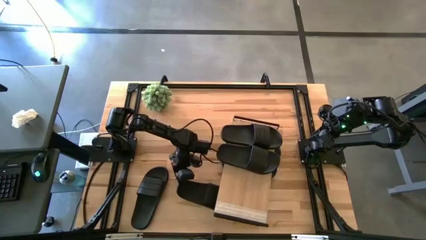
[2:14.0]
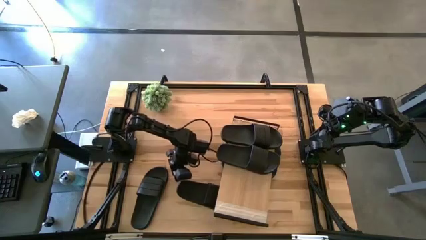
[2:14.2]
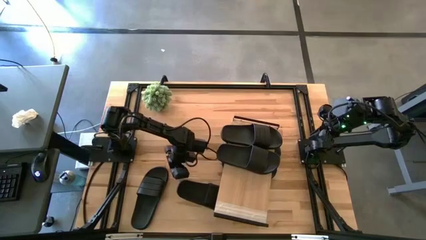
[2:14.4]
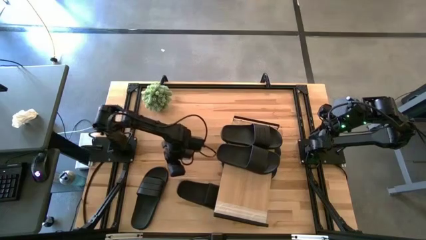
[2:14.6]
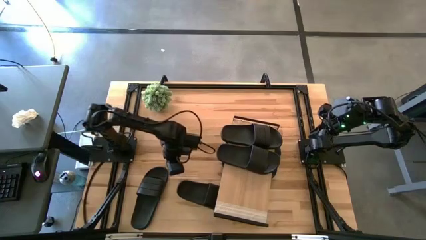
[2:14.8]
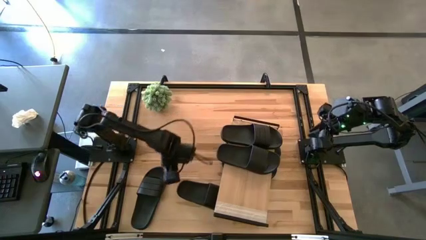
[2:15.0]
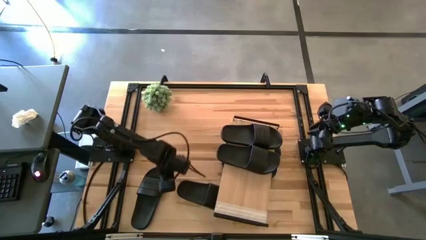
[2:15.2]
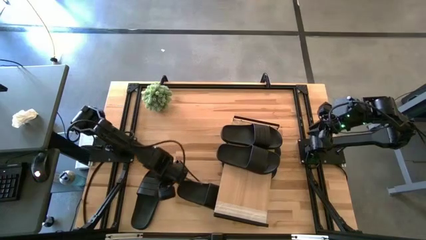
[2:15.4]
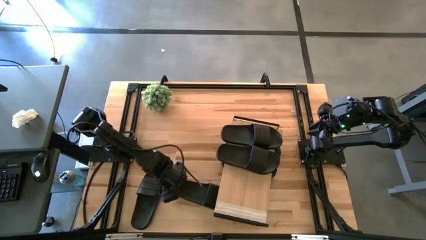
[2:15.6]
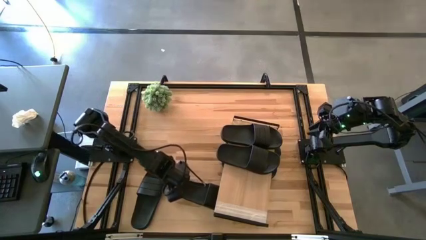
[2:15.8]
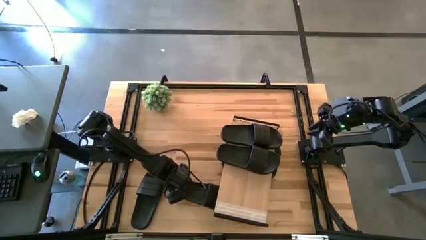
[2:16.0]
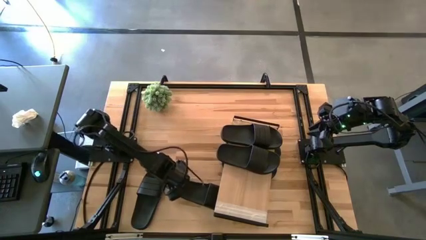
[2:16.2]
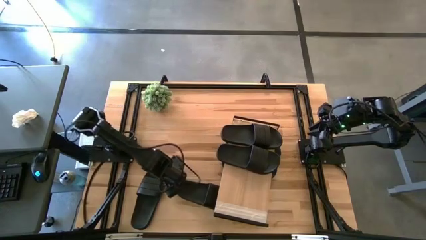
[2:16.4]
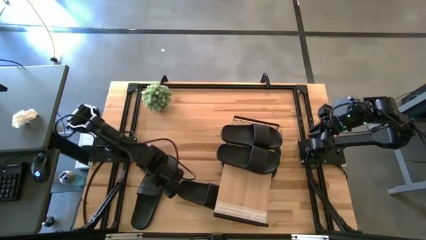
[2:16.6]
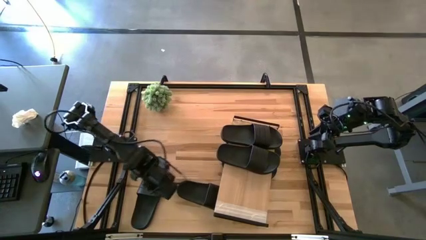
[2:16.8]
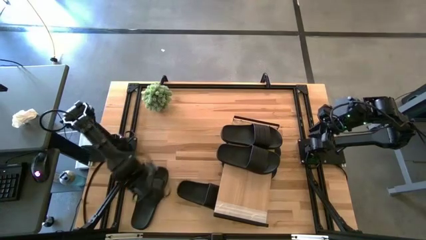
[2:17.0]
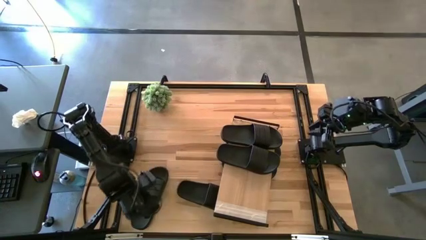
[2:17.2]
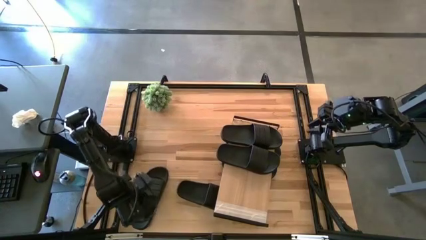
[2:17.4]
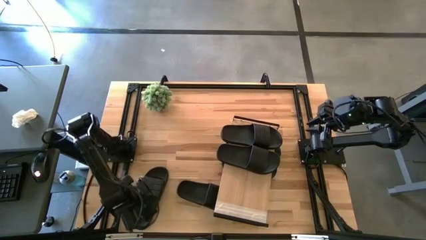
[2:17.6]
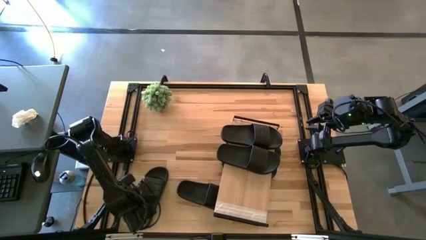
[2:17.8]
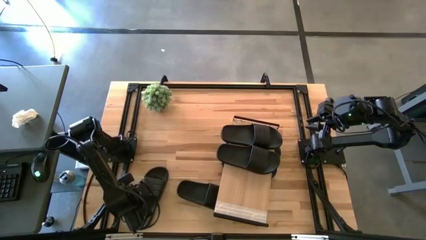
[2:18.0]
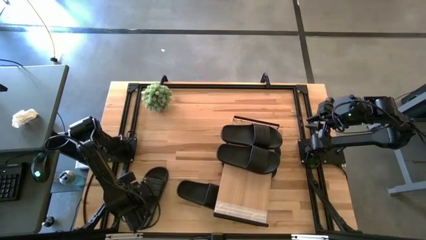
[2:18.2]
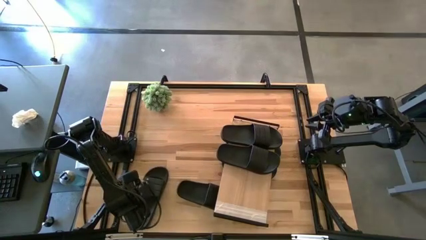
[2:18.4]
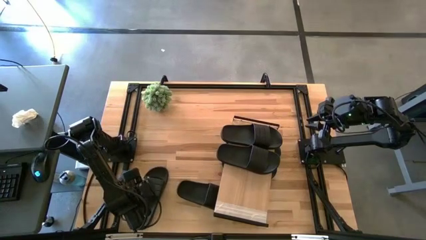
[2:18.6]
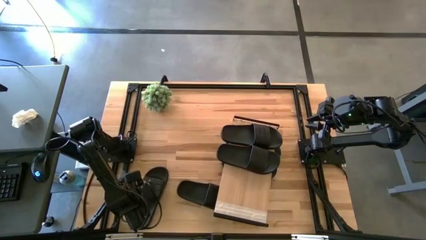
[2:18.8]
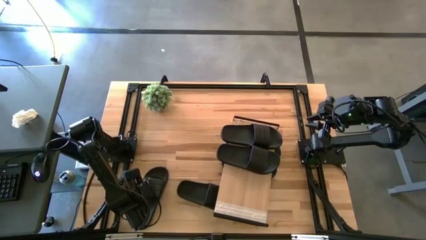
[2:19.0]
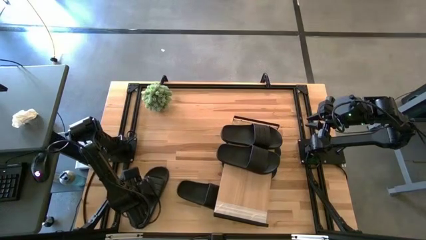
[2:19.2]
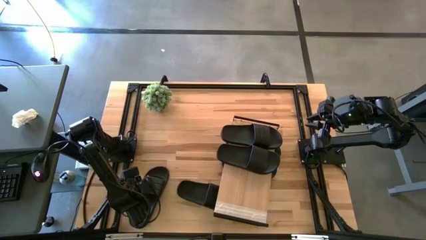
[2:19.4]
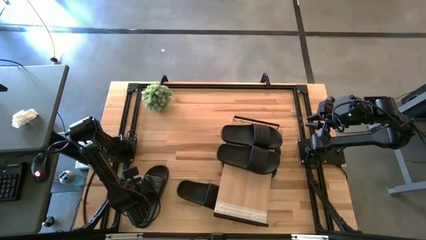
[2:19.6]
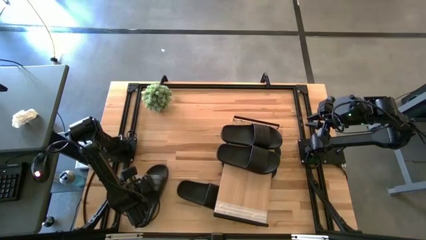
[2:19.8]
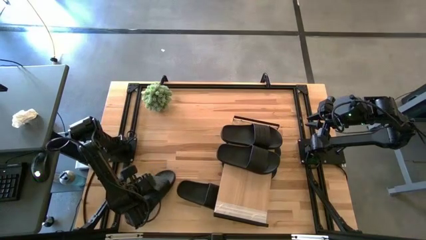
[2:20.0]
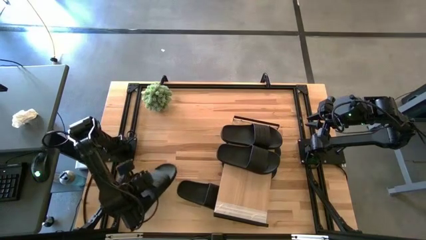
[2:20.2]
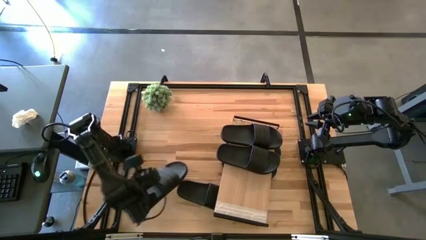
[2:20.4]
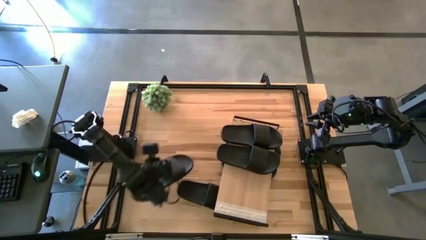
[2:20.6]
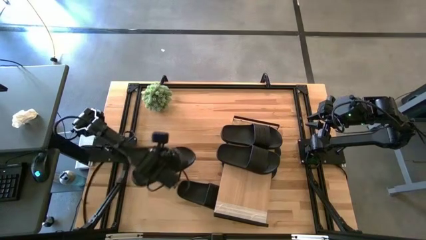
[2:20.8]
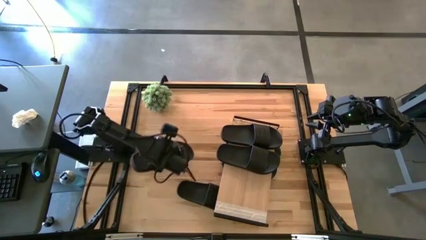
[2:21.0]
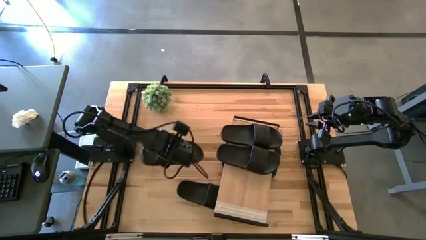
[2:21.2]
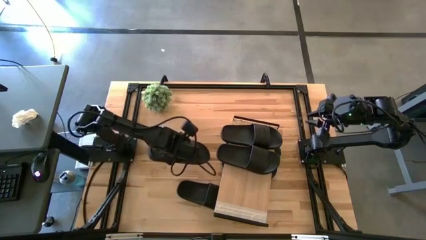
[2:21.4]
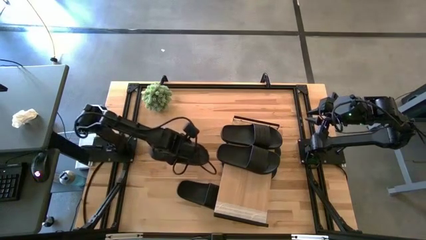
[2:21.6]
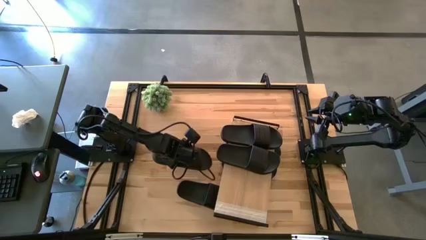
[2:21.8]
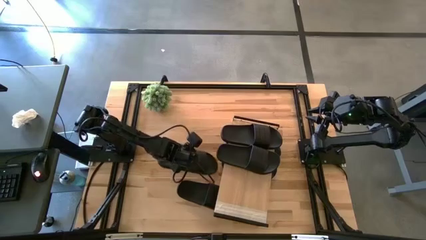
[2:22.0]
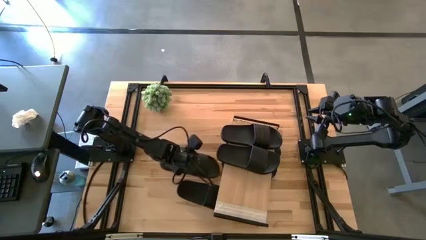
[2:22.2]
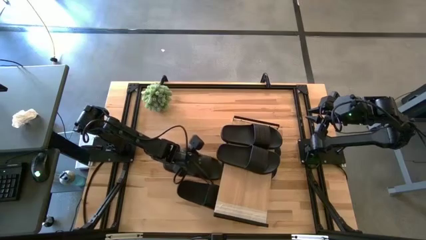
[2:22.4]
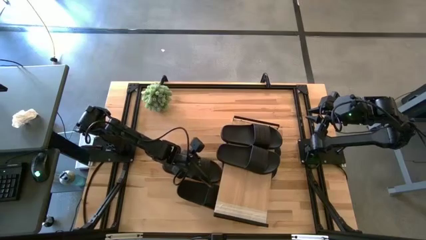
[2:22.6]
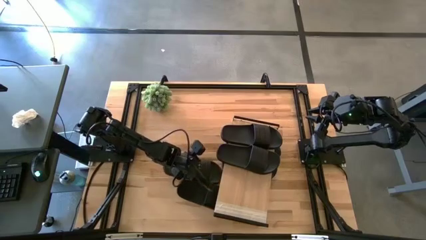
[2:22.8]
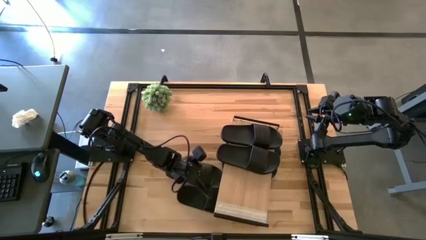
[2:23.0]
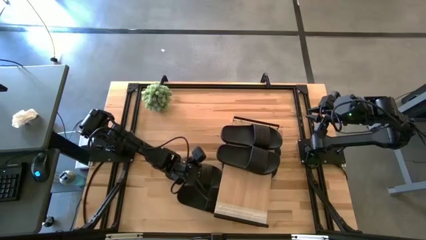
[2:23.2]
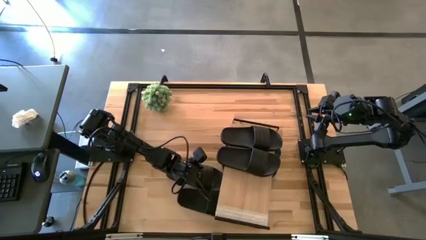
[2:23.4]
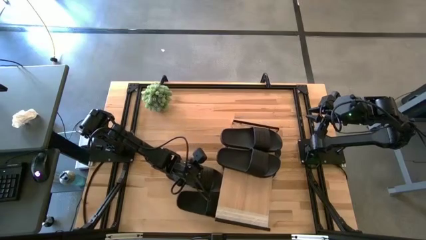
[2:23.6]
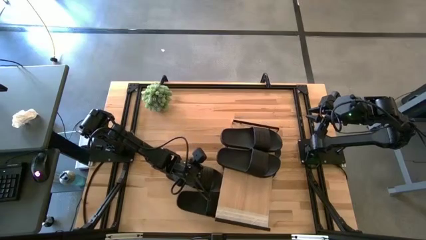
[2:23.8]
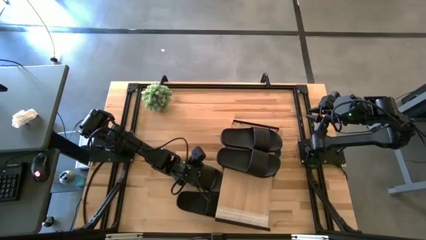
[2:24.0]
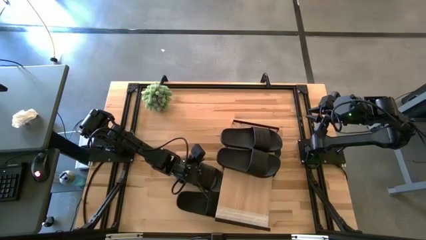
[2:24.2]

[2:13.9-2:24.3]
Task: Pick and place slides into the shelf
Put the black slide under the shelf

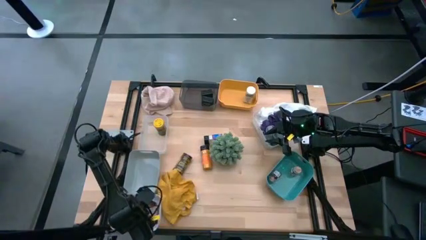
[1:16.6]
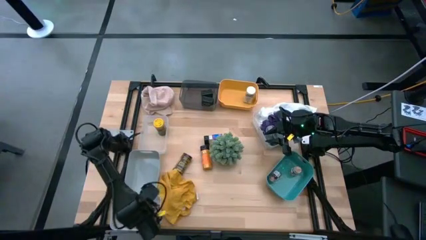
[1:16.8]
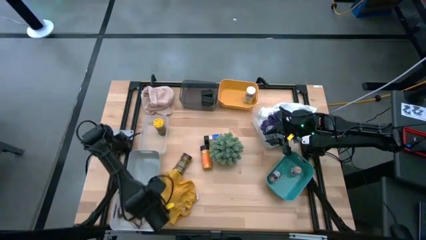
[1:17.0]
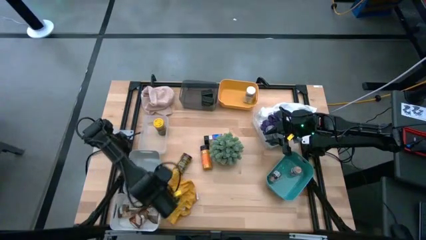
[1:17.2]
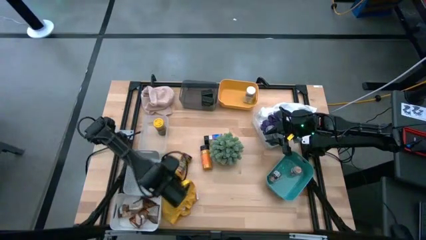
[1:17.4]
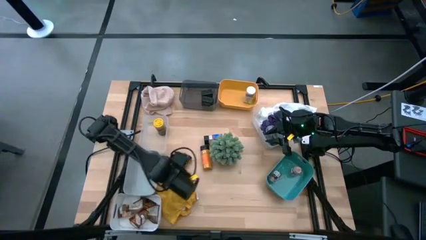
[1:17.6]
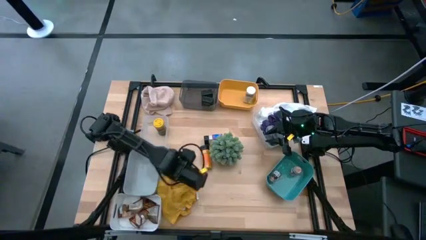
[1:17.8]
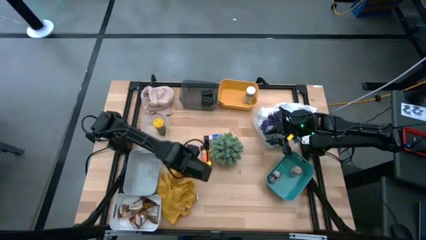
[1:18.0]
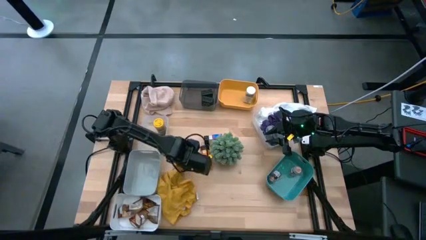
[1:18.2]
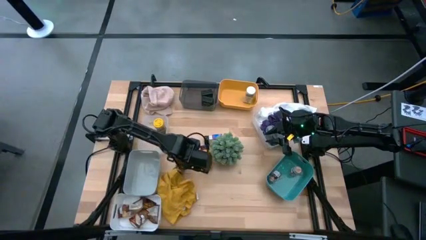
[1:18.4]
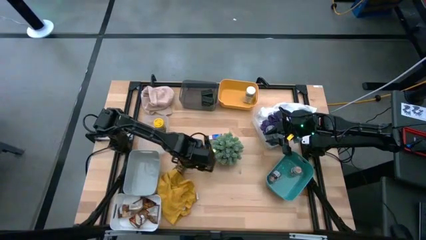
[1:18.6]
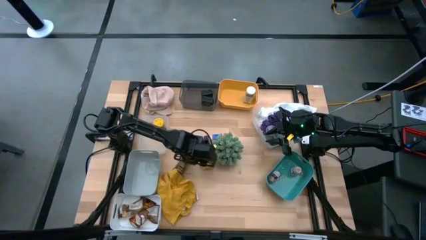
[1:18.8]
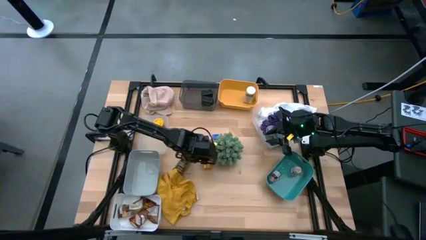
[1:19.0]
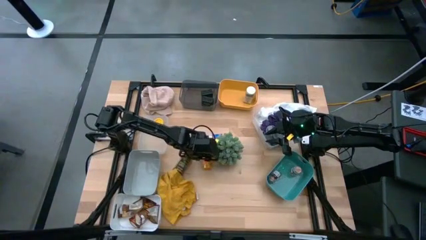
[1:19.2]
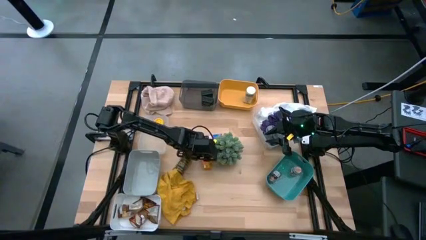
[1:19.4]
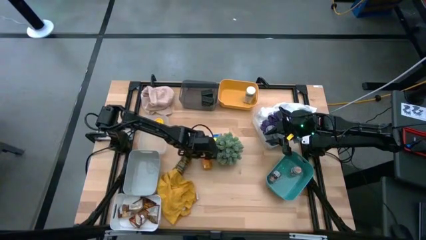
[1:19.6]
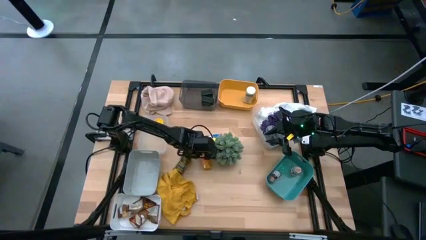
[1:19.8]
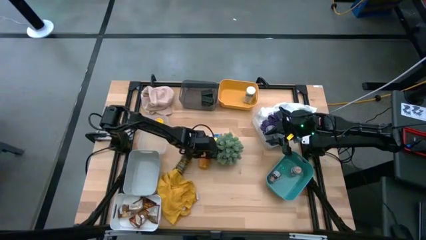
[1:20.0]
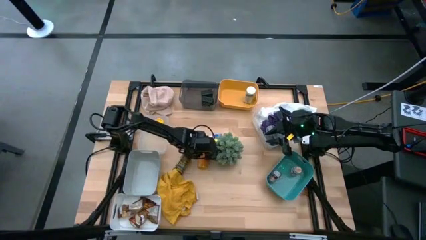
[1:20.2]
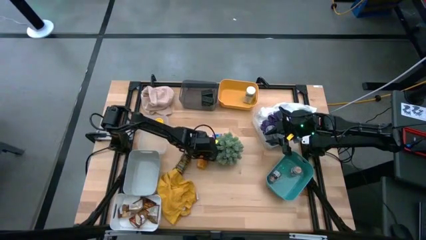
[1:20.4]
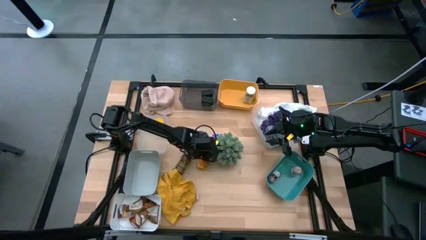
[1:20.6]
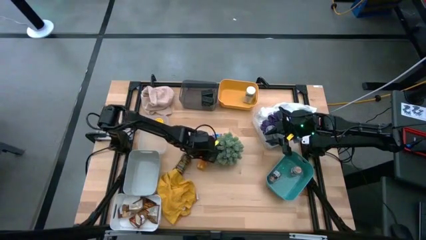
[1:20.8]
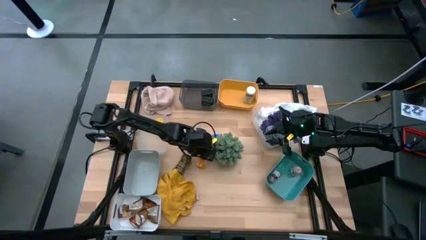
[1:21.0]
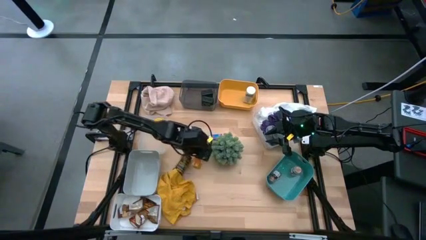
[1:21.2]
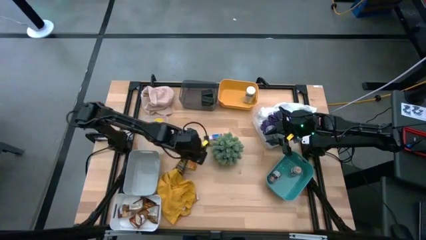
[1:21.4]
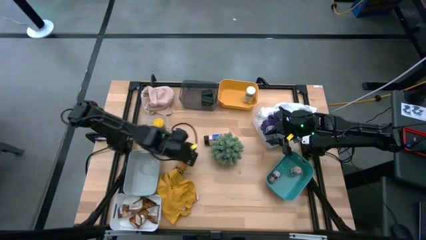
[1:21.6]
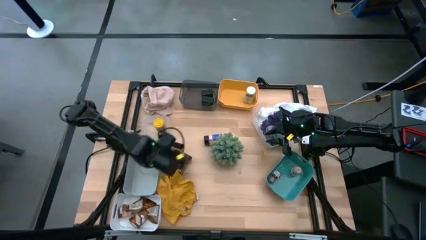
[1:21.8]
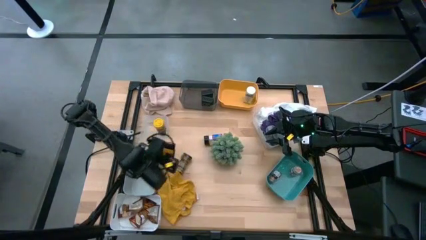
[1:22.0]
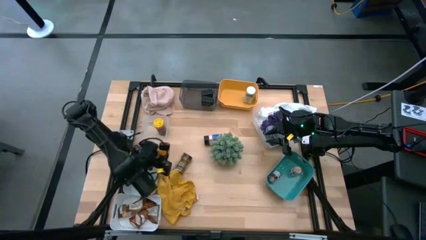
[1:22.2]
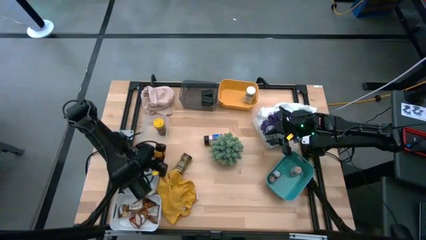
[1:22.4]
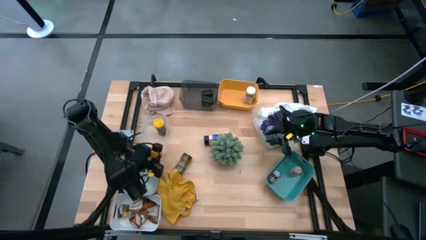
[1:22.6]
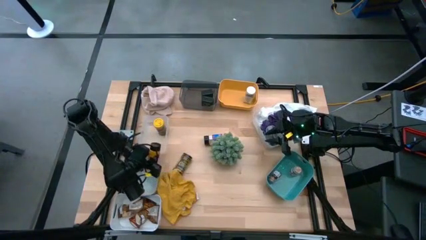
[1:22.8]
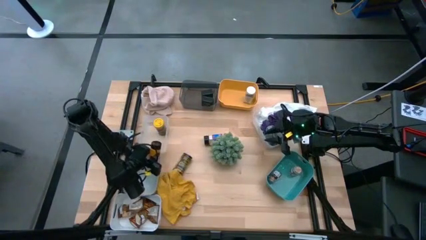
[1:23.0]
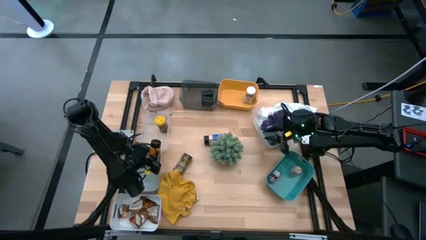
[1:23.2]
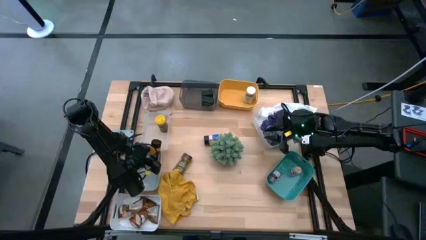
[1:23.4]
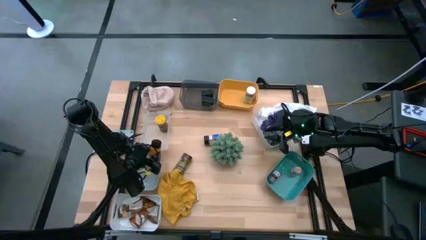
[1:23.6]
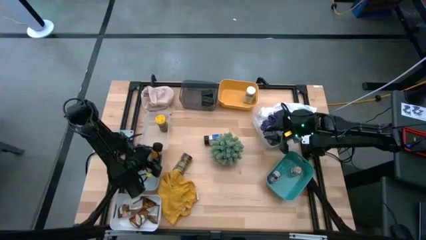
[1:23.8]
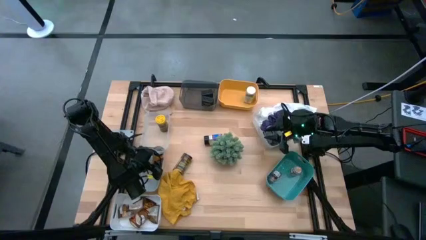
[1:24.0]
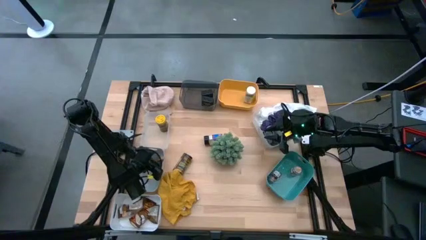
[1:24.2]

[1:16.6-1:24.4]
Task: Sort spices by type
Put the black spice bottle into the top white bin
